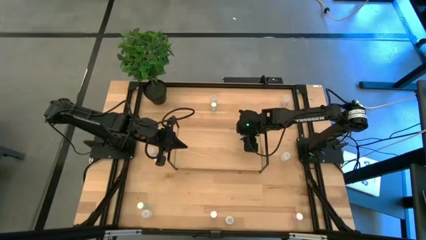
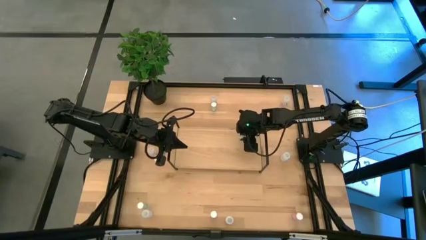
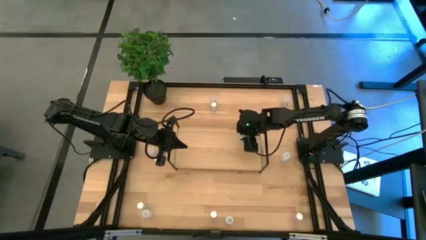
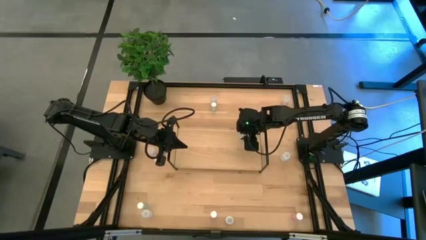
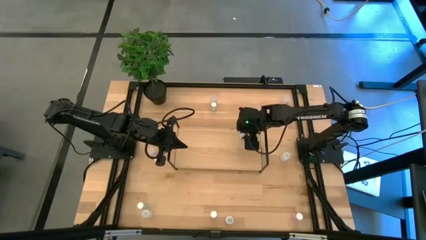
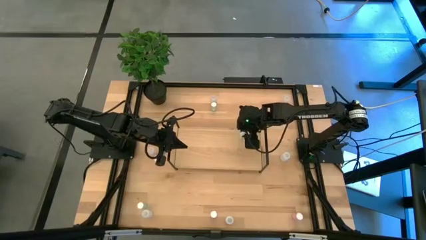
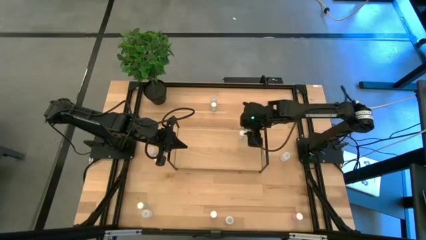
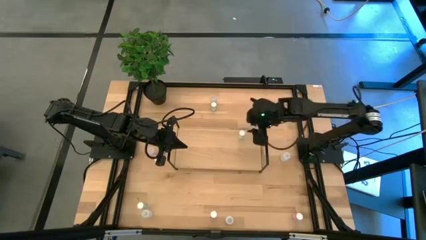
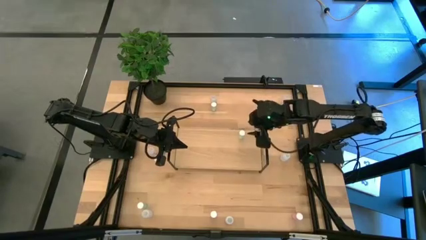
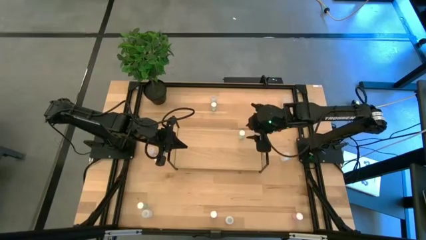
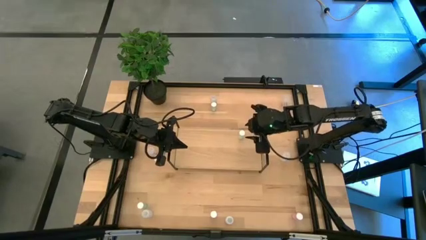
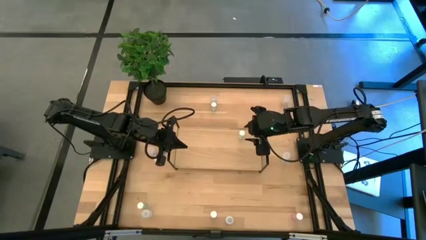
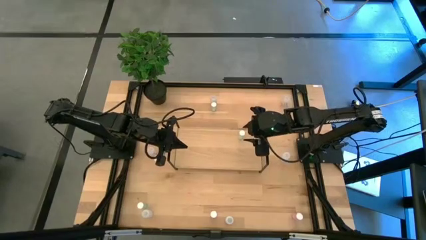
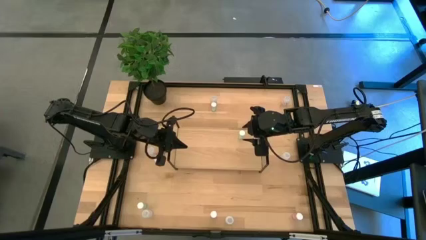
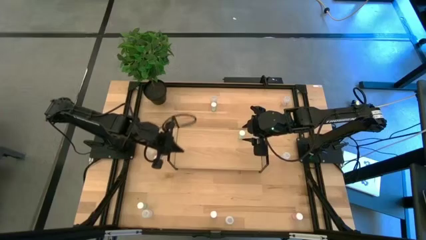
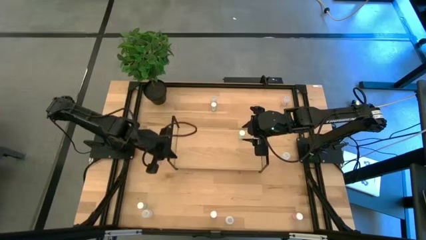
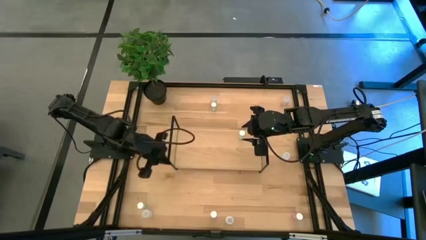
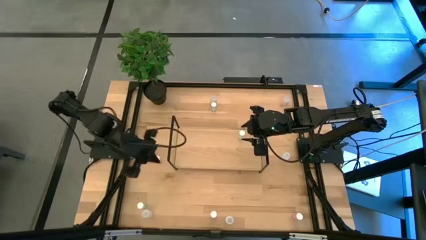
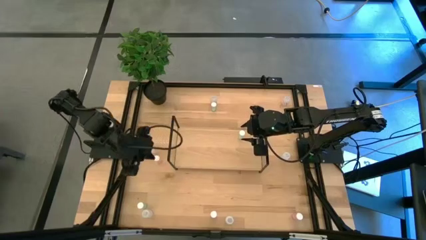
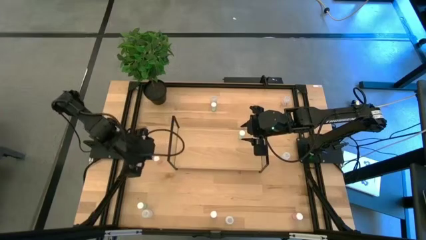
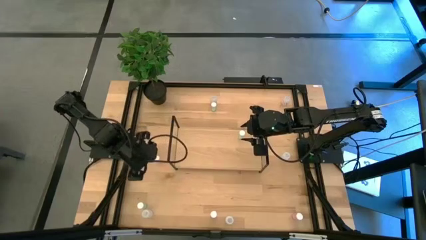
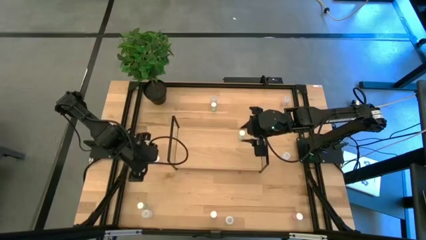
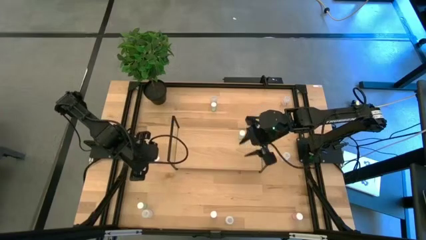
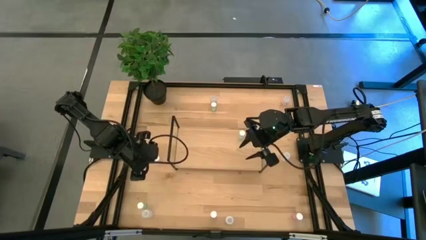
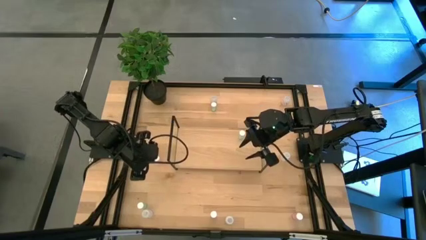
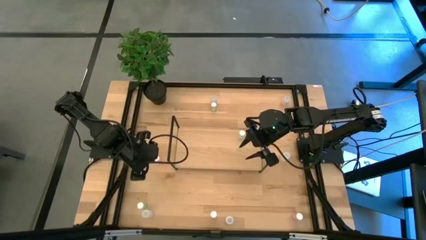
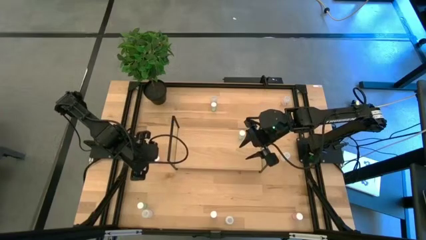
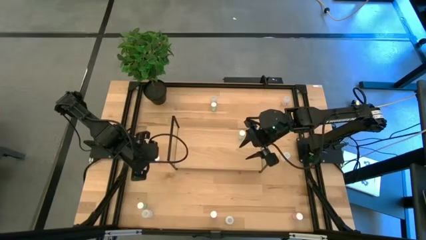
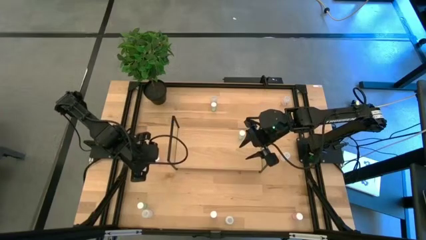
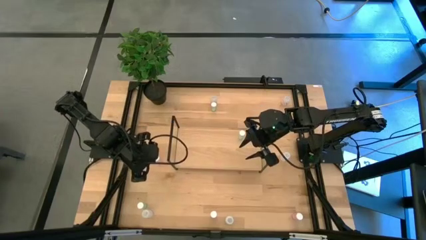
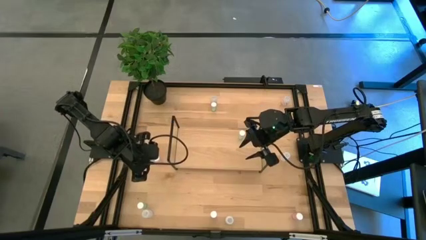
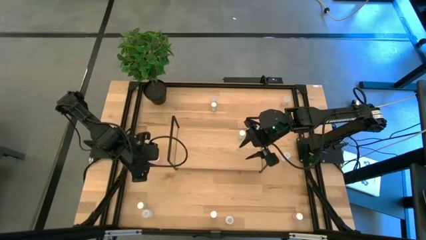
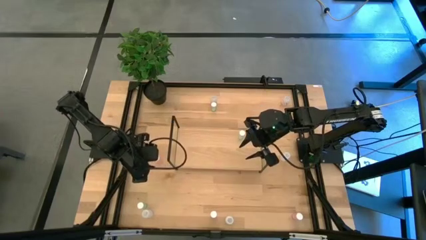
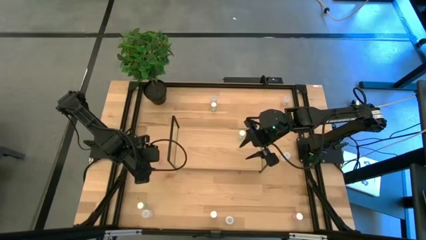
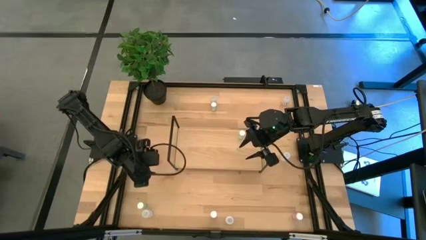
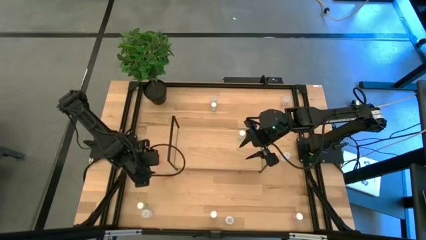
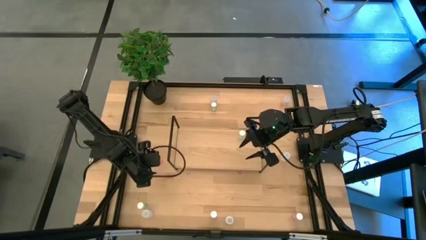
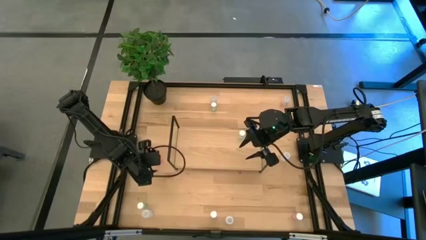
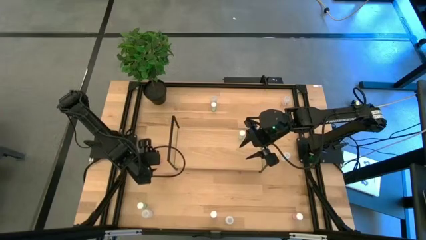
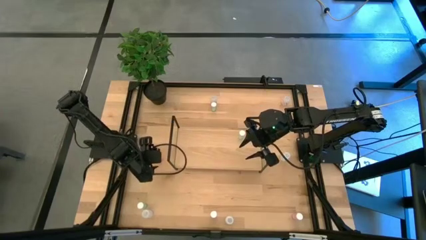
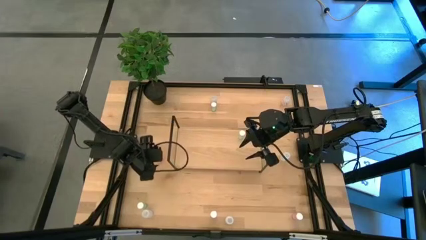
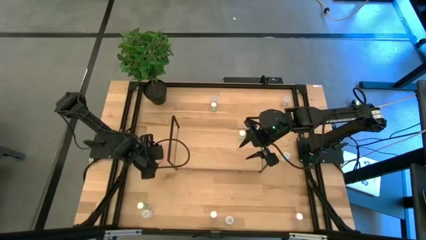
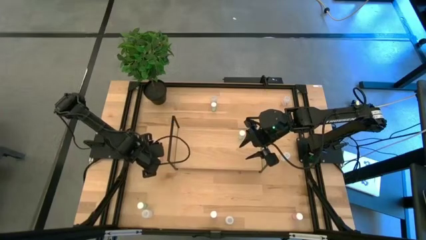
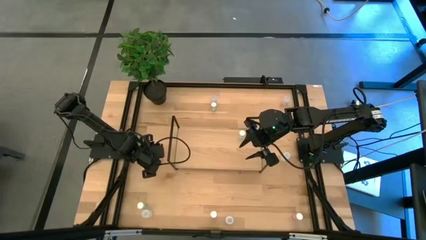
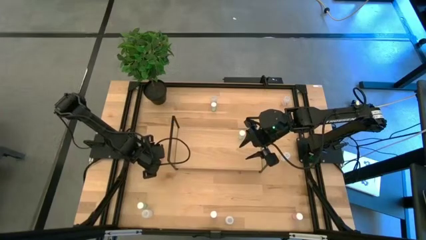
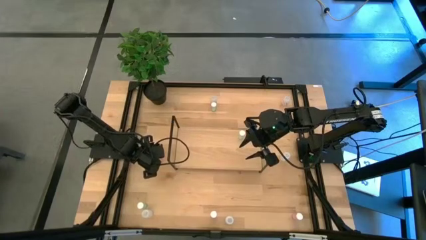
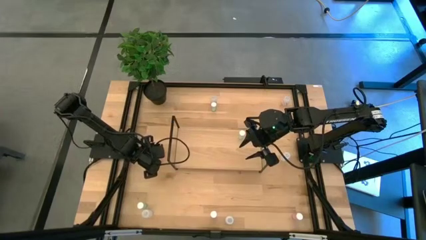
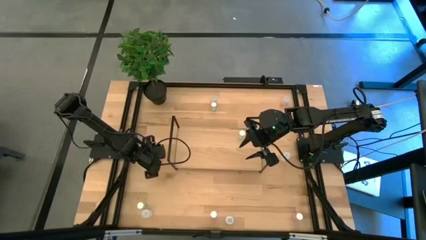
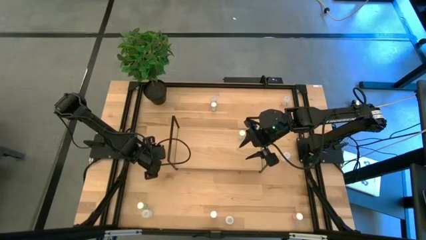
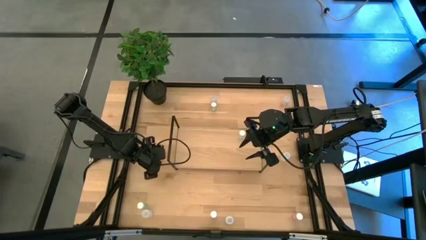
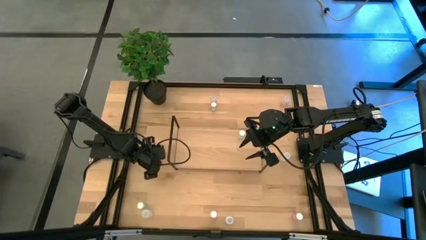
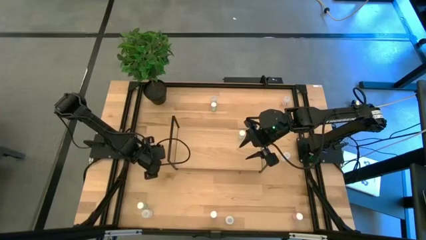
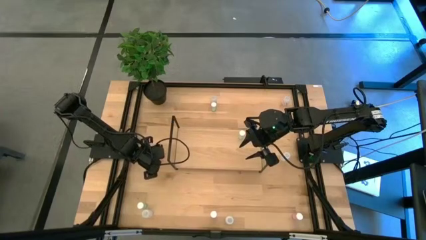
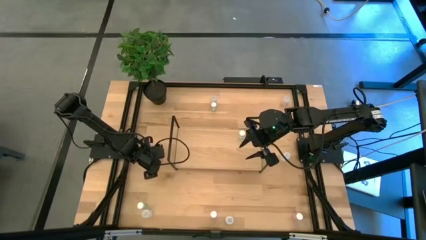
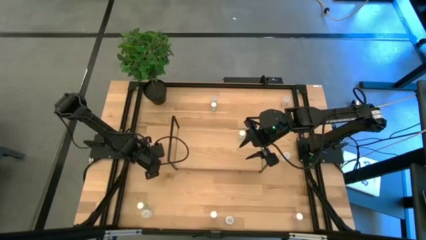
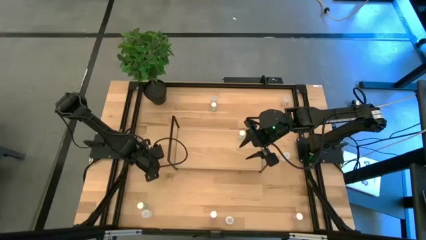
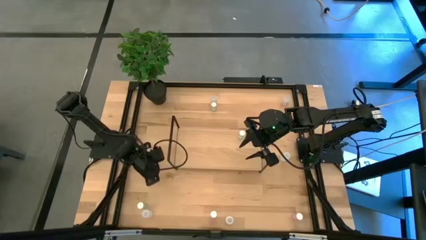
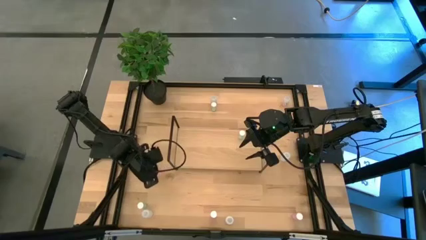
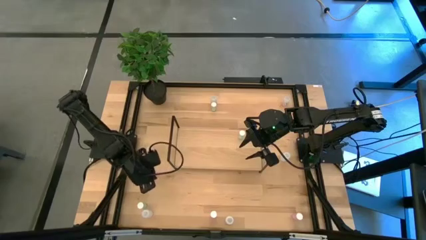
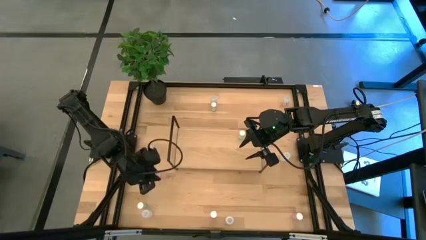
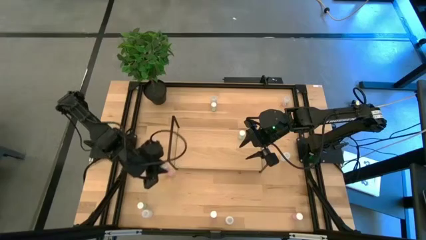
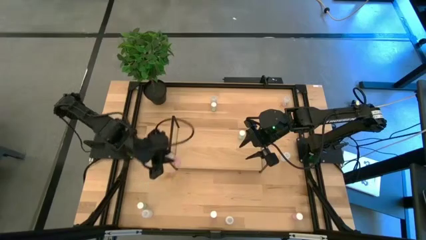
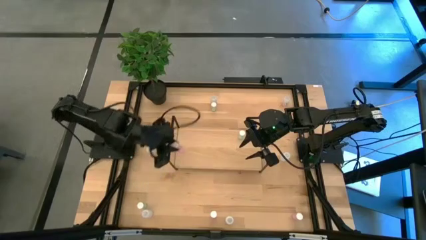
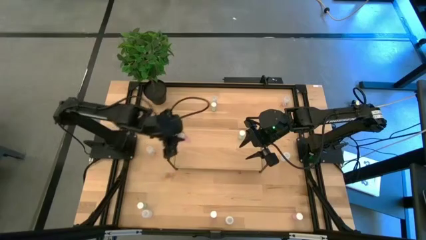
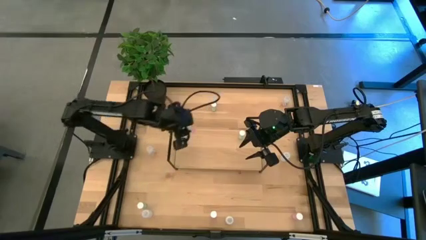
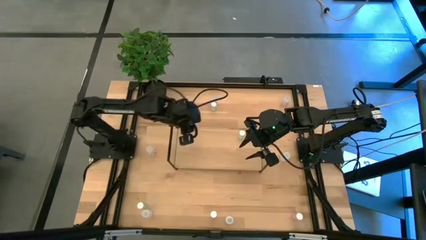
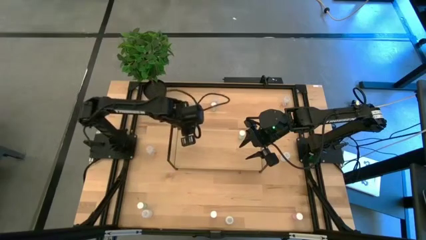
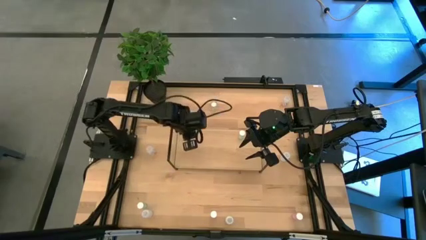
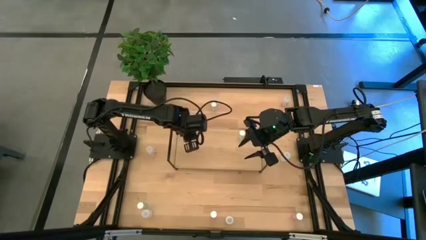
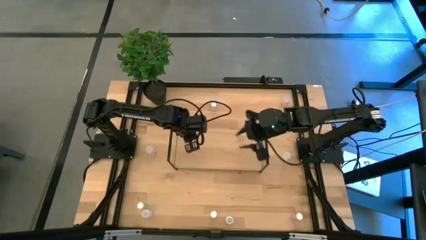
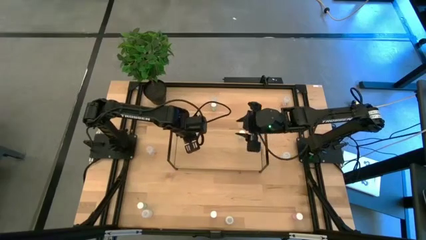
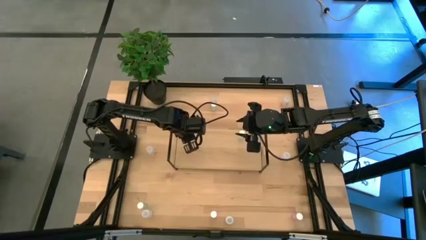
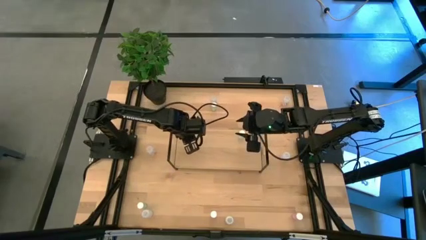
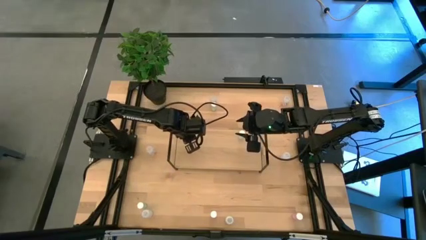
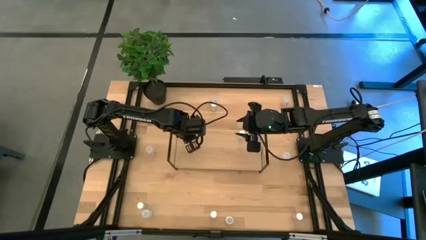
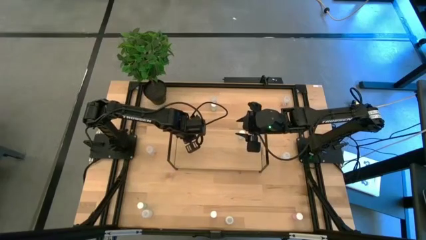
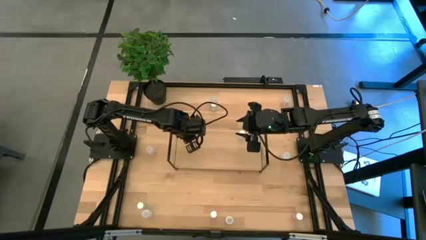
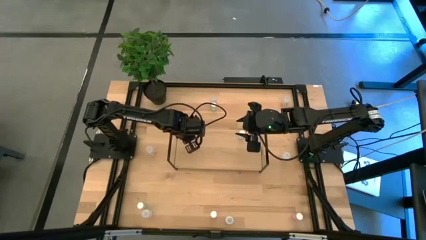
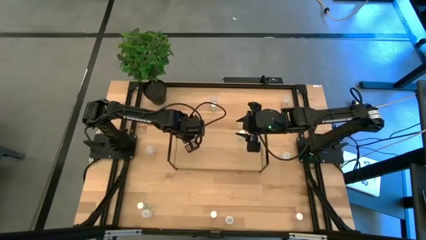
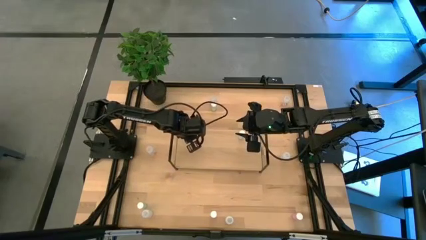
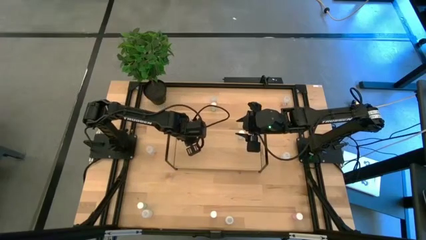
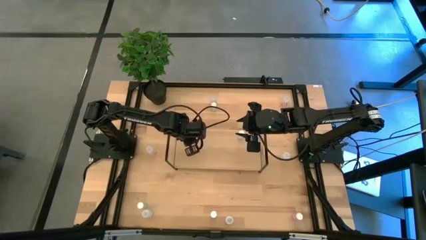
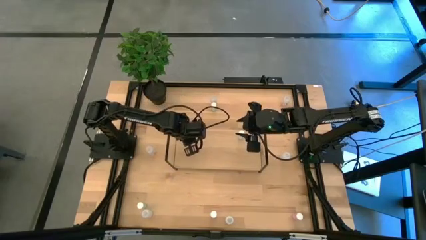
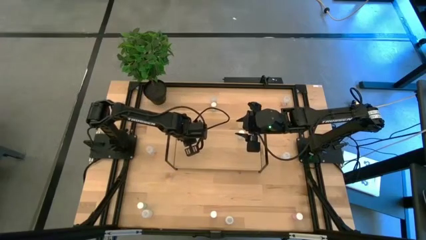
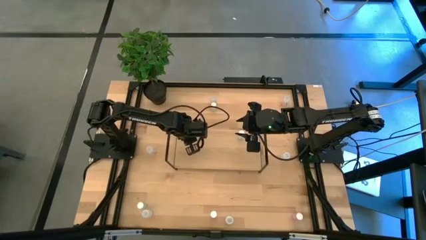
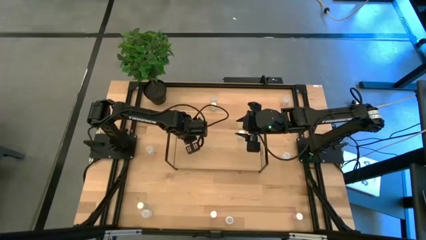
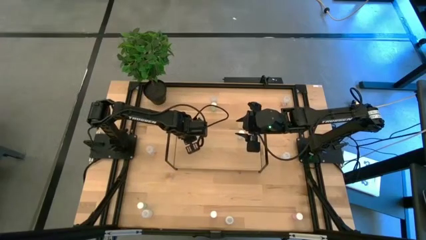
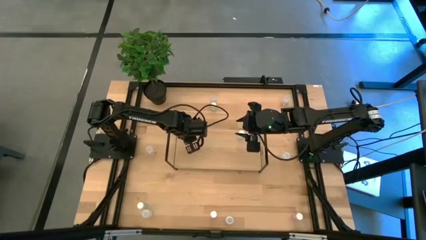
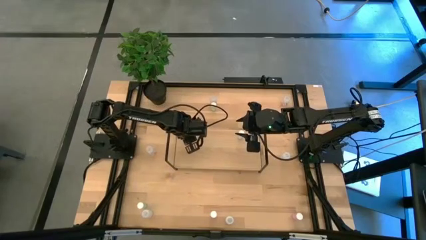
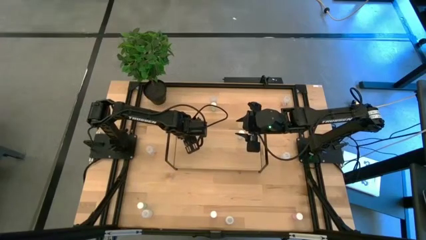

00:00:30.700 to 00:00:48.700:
Task: Pick and place medicine bottles onto shelf by color
Put the left pink pill bottle on the shelf
